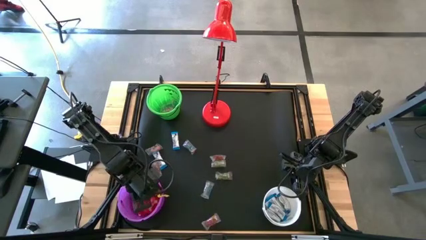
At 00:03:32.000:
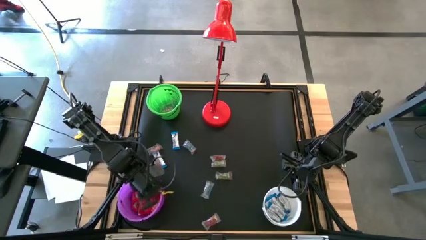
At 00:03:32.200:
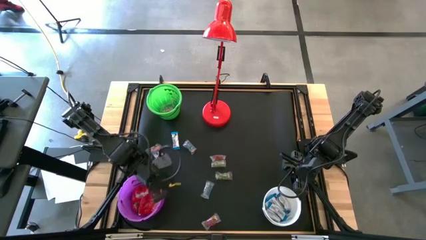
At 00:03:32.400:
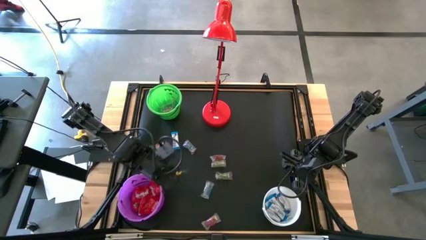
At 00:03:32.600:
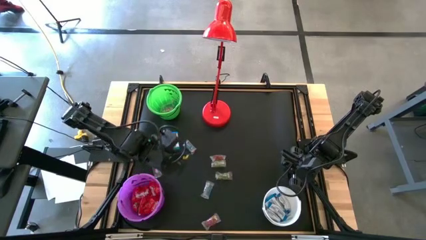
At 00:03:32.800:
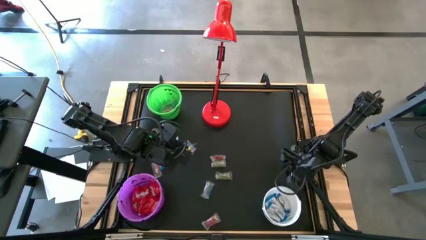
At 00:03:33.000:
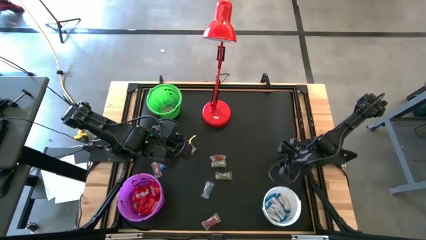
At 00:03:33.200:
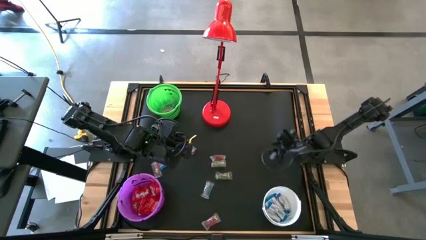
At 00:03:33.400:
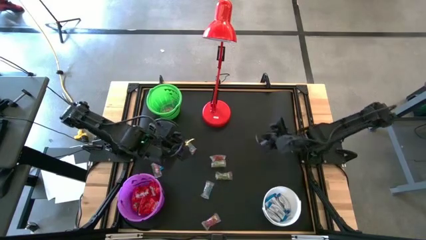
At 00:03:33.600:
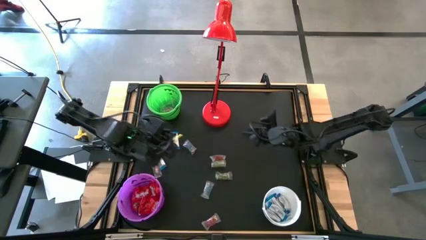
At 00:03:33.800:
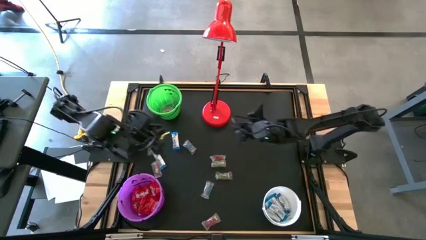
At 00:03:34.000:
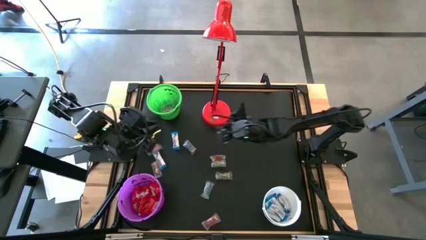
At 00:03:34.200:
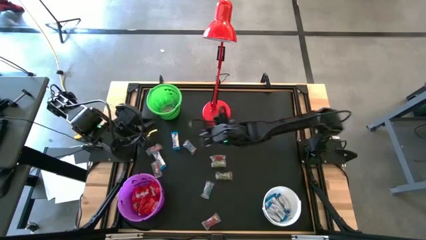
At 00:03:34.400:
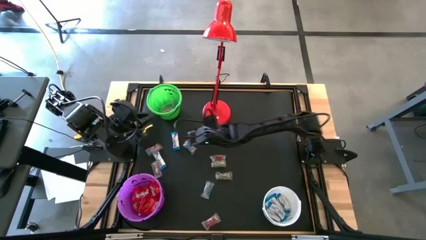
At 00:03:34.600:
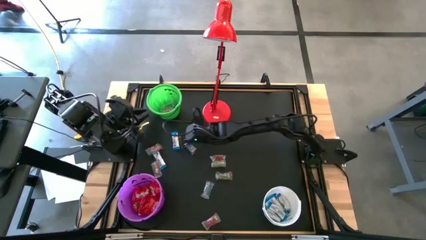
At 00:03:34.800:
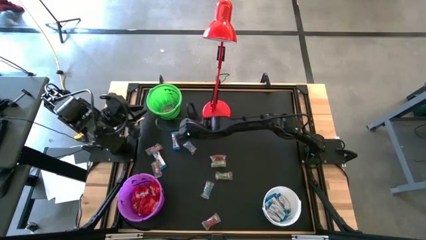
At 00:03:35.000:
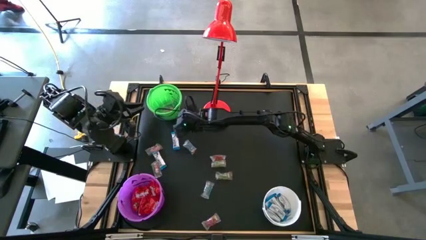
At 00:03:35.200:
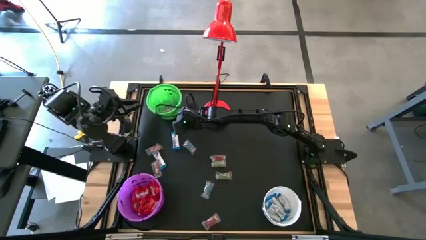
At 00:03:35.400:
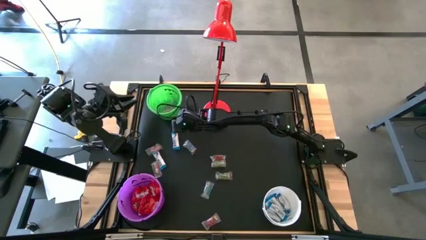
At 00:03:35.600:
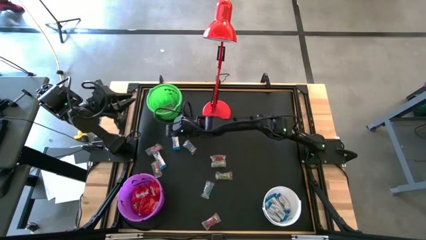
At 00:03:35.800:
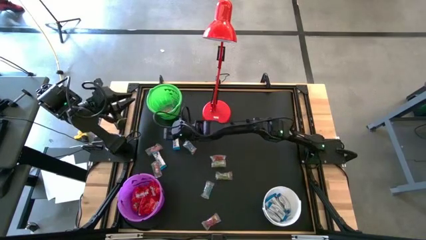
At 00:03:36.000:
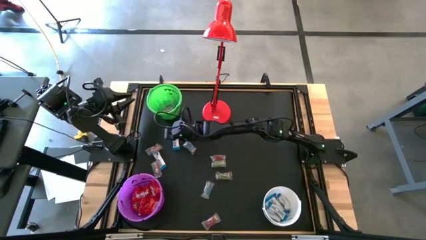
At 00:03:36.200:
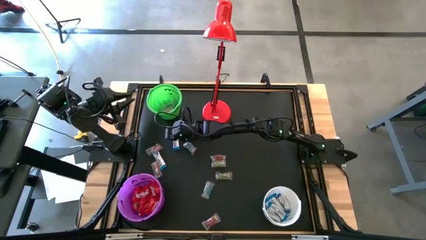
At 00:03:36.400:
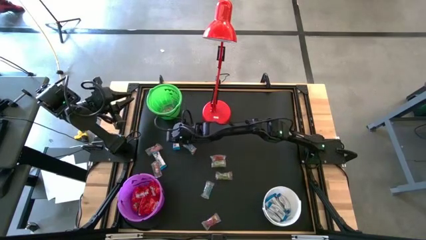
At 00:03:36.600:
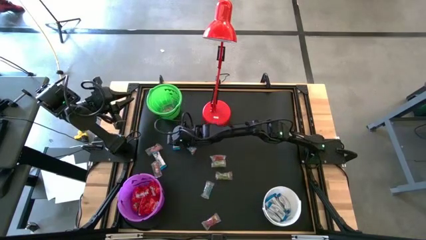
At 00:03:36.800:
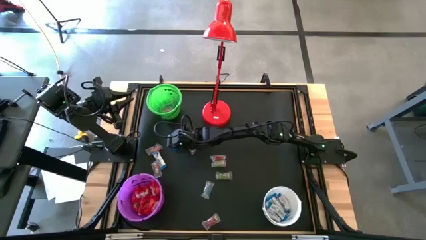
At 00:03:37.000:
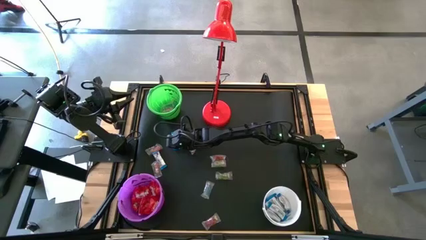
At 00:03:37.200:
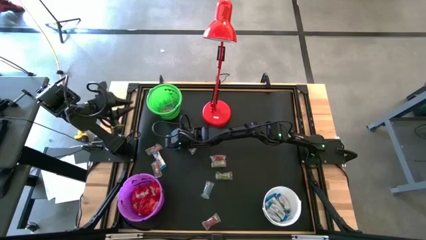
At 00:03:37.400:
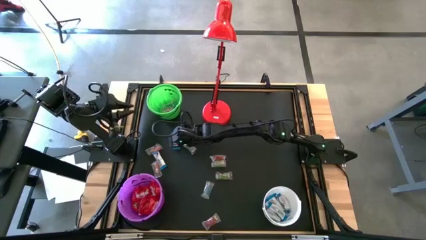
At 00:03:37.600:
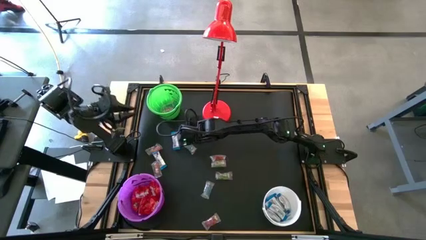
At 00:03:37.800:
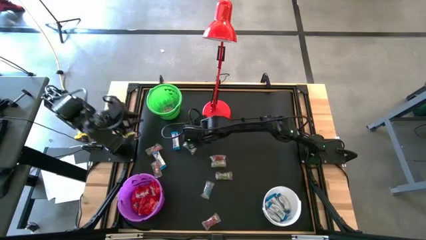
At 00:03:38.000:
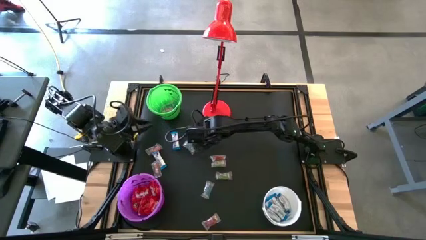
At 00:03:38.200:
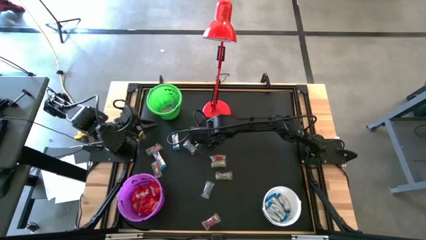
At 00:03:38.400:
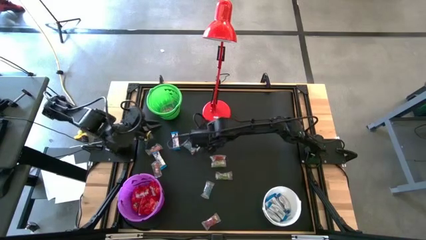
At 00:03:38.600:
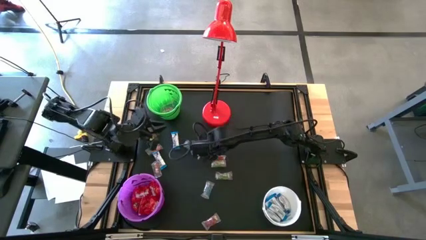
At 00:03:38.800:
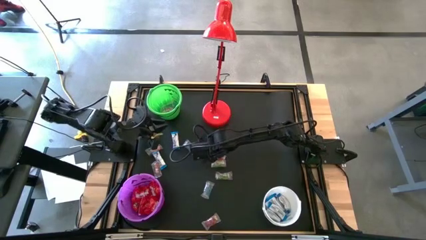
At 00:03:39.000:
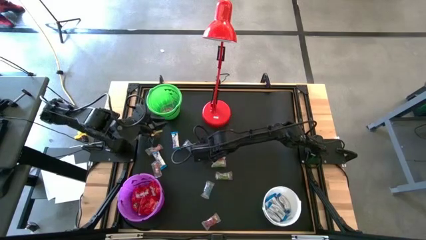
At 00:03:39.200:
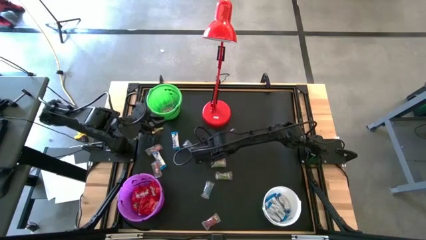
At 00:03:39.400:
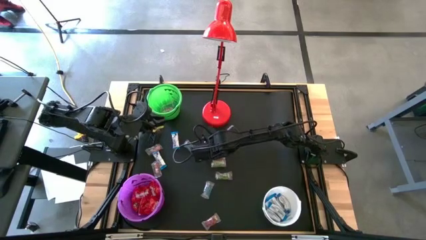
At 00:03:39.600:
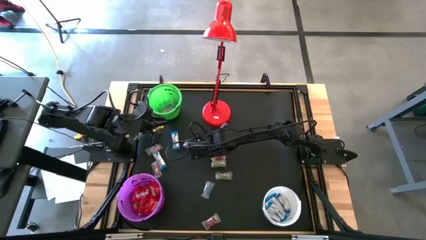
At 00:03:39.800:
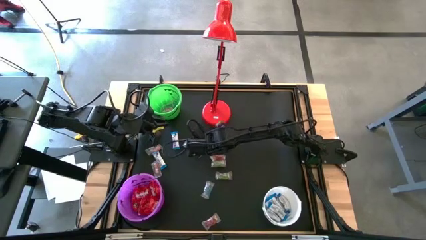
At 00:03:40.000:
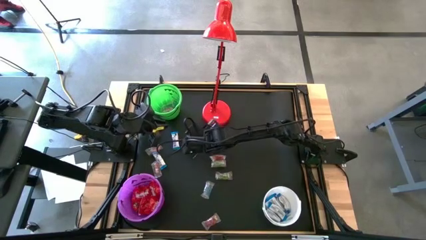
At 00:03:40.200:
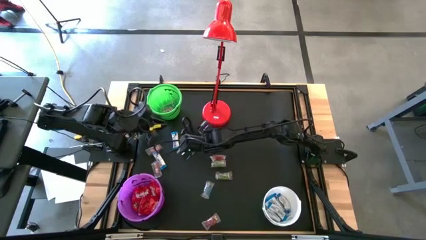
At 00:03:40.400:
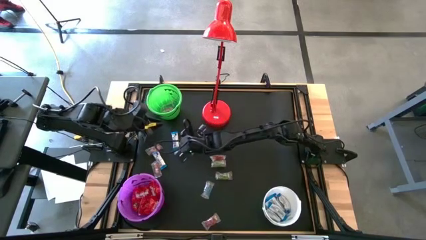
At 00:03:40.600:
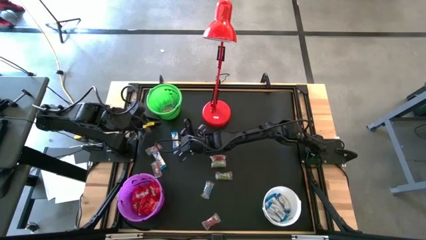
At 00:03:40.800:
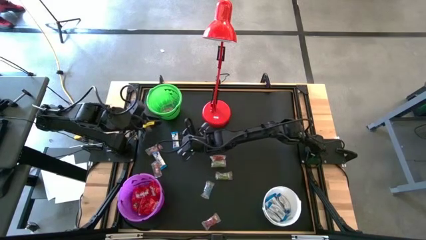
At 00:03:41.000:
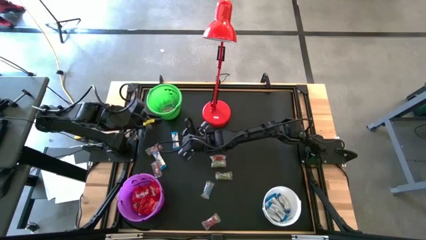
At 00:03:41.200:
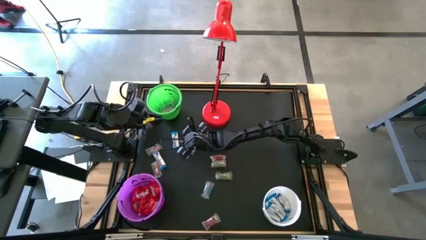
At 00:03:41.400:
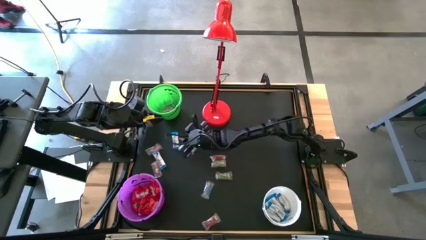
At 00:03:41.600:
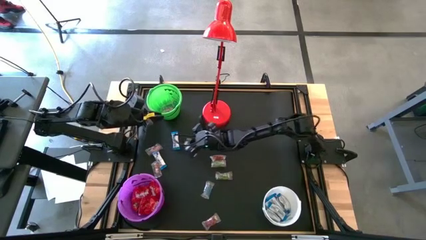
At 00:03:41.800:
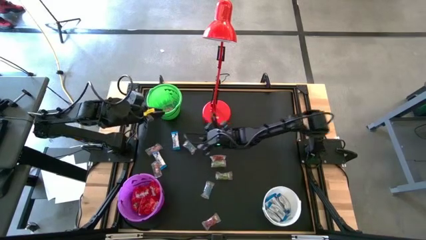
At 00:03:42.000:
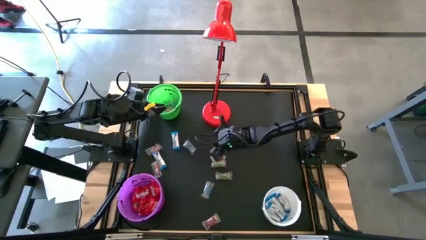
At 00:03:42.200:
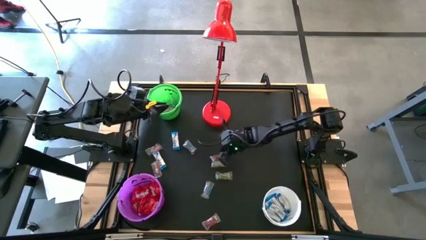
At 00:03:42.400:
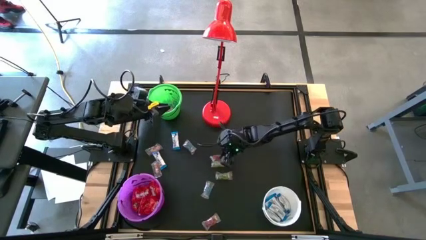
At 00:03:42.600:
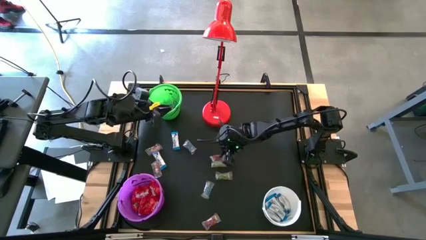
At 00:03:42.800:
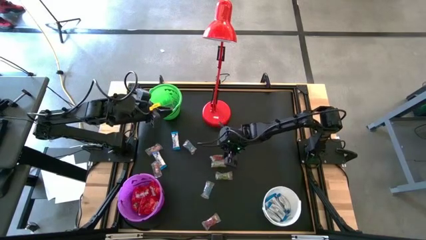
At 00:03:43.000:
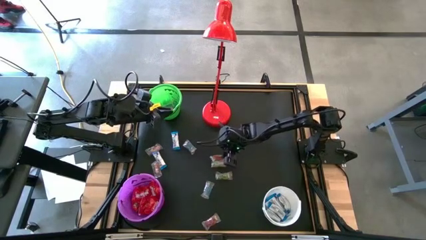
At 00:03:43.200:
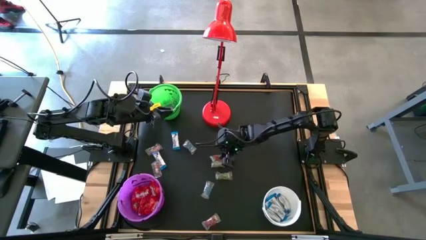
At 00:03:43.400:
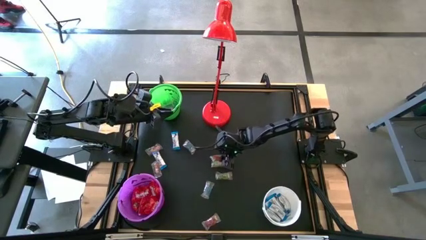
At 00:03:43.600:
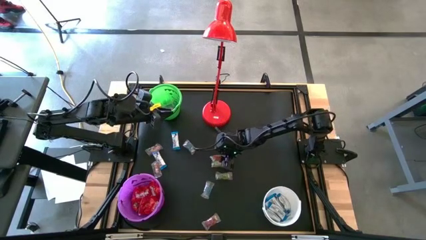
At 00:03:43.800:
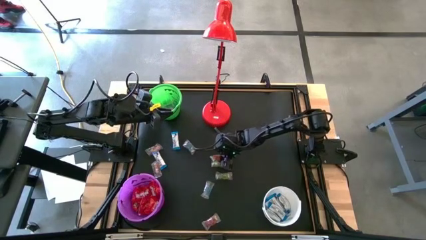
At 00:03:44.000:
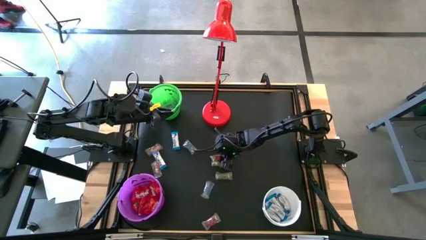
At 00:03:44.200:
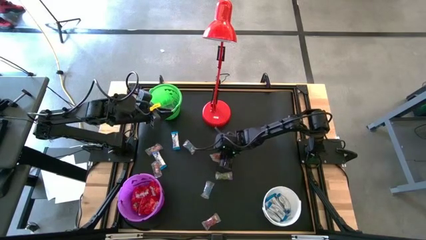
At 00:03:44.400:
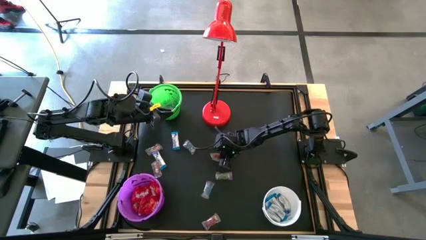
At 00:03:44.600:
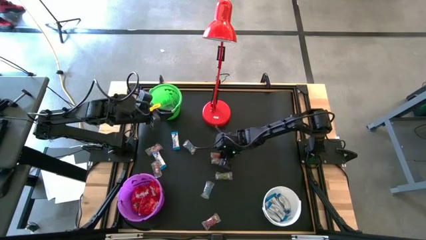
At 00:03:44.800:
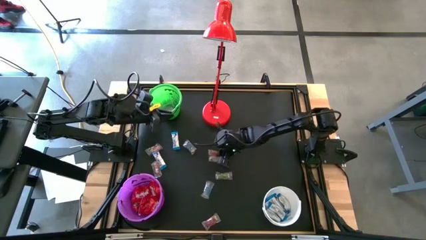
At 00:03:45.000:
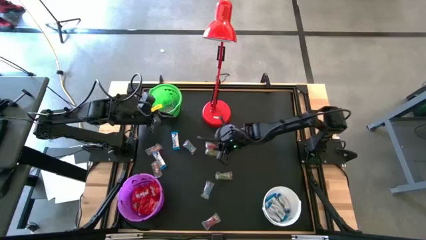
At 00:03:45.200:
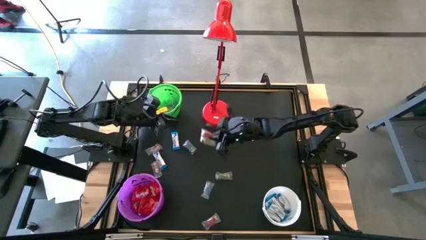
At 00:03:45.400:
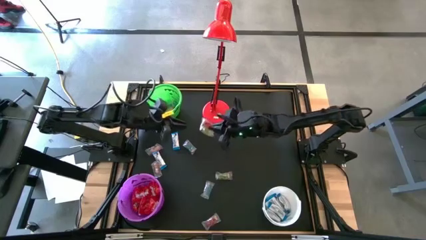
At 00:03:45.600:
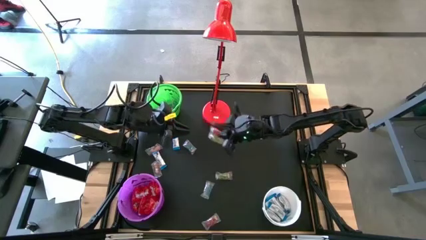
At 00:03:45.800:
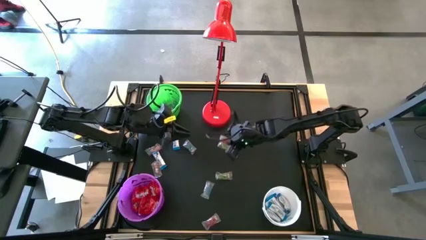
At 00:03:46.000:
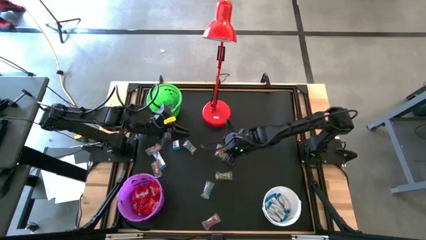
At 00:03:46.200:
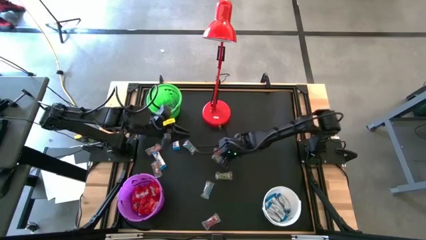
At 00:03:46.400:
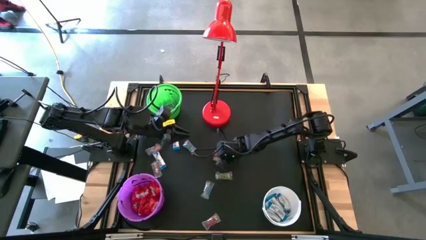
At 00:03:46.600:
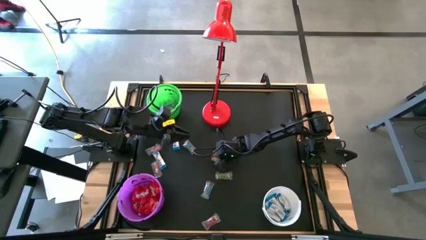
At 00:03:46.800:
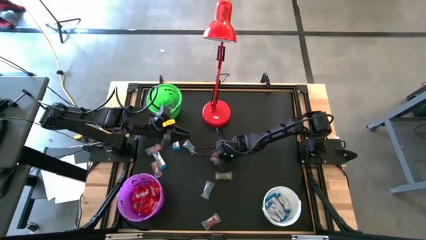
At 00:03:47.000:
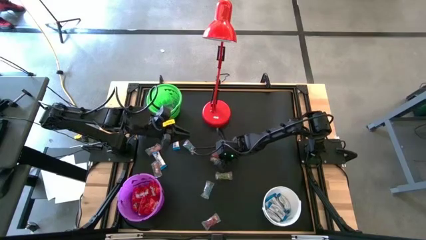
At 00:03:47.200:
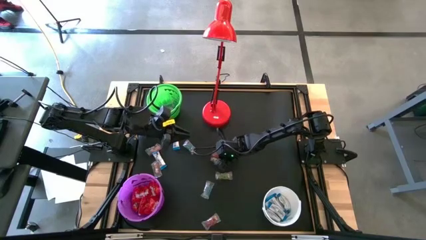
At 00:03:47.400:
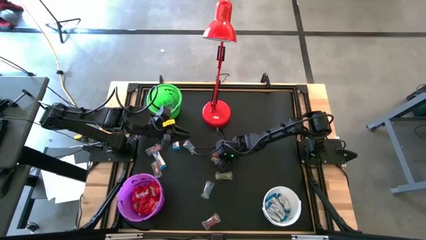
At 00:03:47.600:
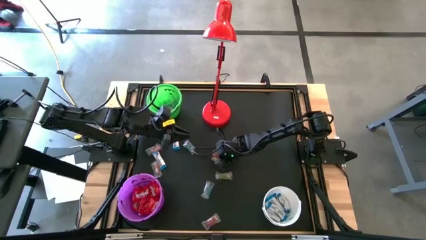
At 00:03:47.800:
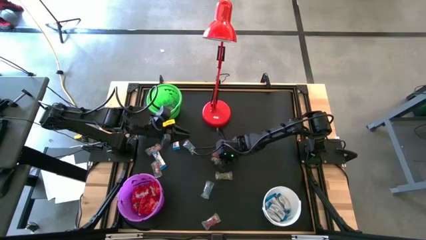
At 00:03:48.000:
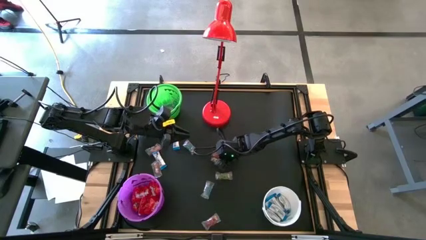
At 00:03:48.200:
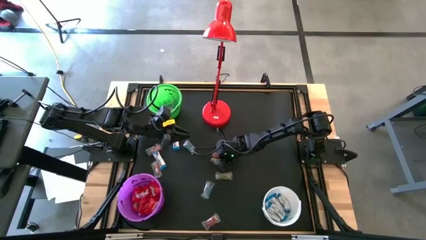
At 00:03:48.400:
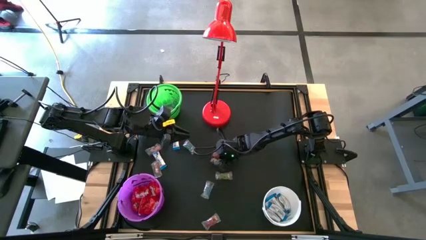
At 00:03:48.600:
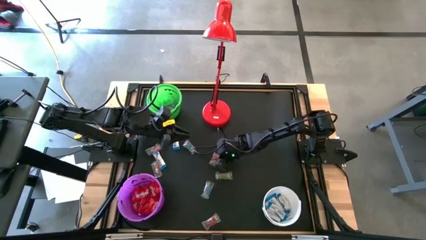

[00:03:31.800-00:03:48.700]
Task: Sort candy
Put the red gummy into the green bucket
